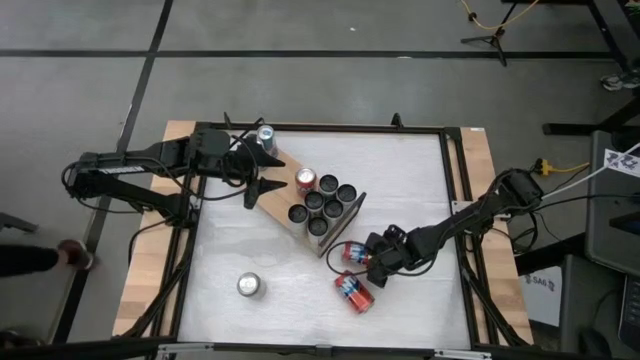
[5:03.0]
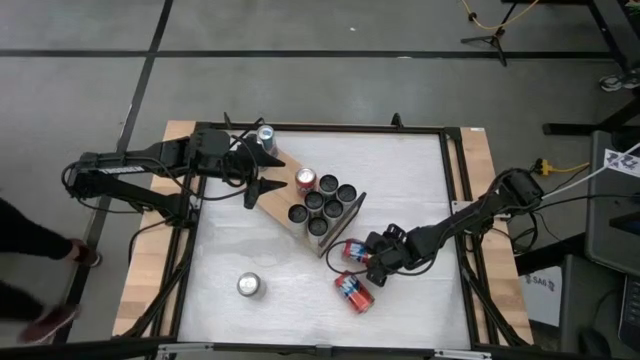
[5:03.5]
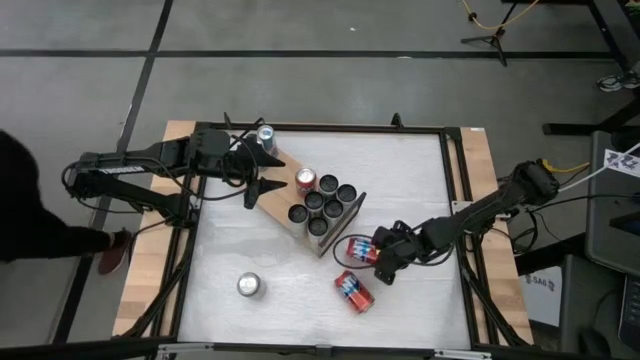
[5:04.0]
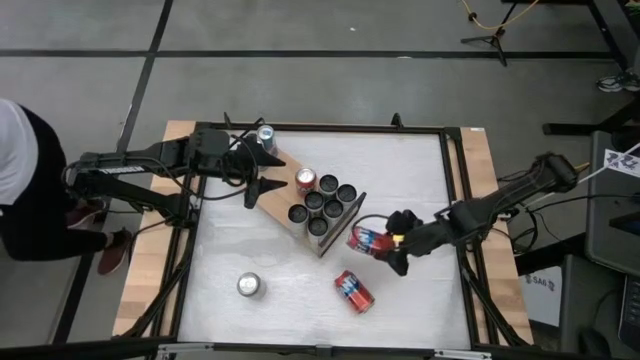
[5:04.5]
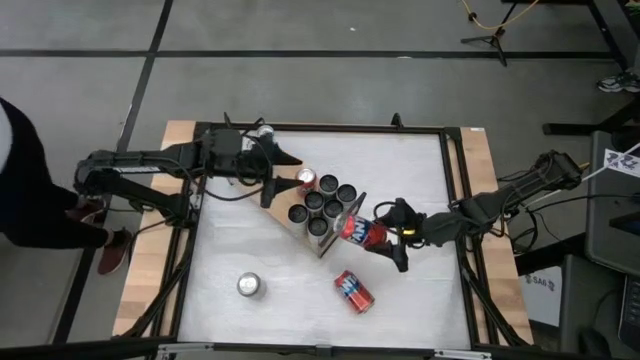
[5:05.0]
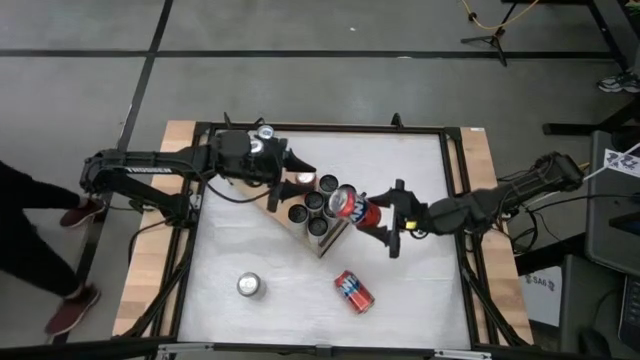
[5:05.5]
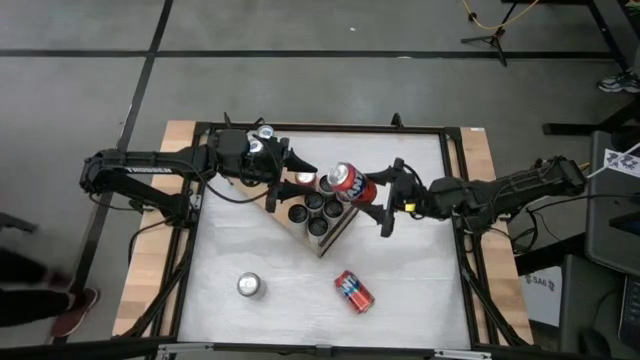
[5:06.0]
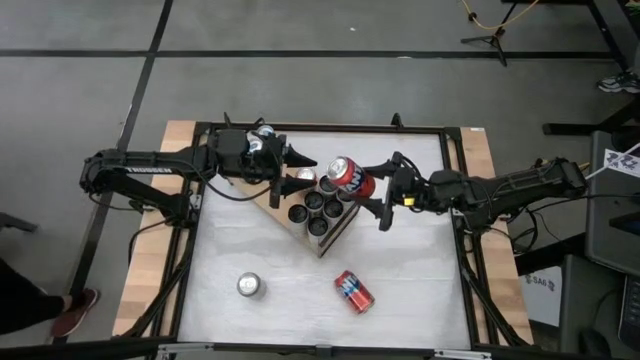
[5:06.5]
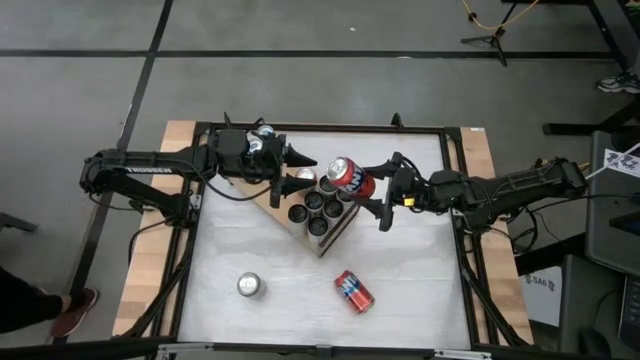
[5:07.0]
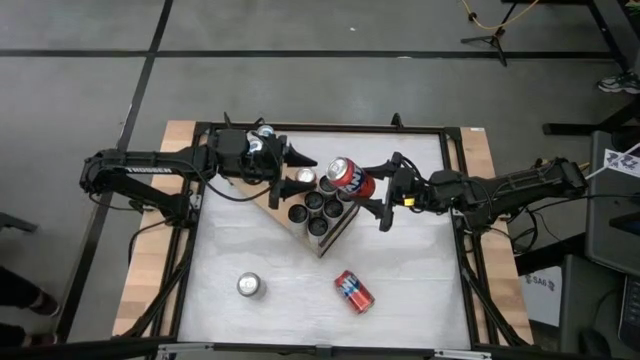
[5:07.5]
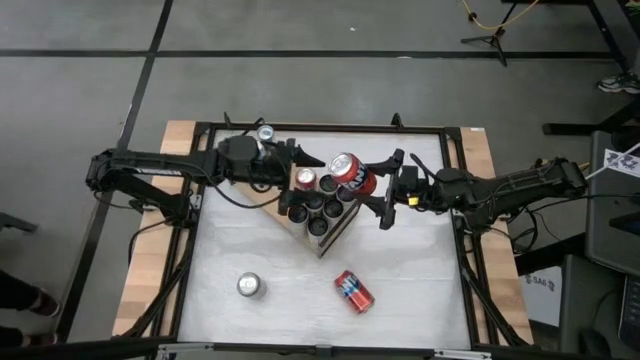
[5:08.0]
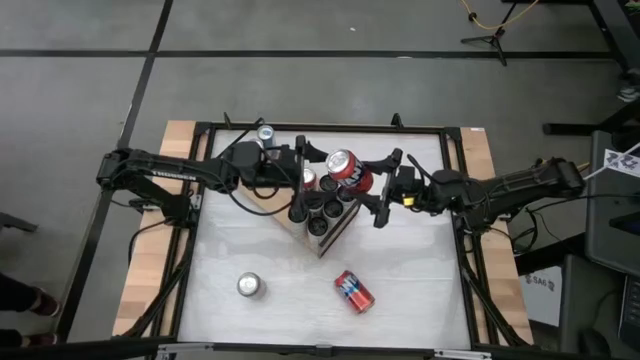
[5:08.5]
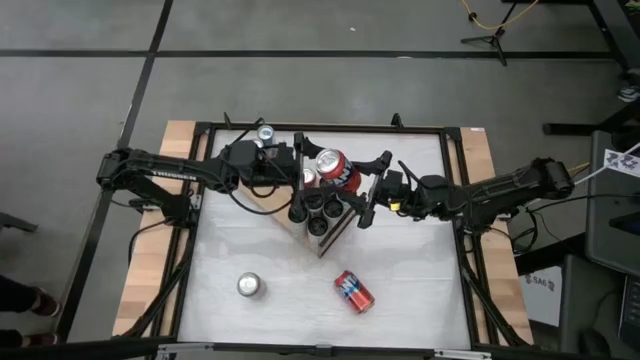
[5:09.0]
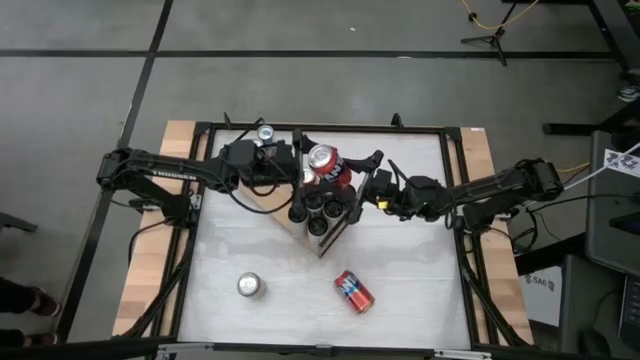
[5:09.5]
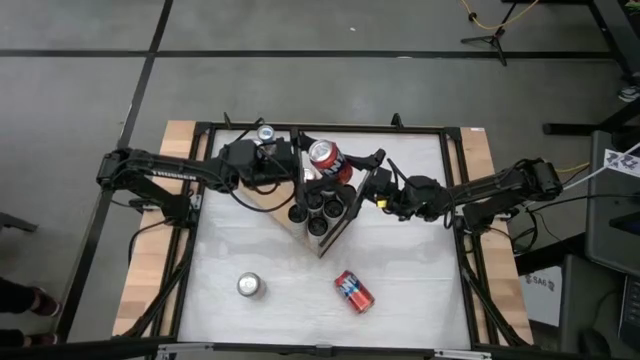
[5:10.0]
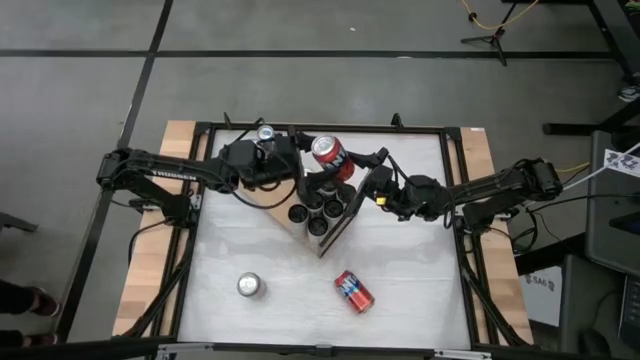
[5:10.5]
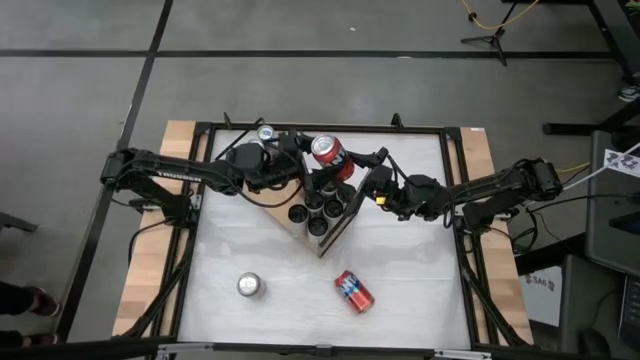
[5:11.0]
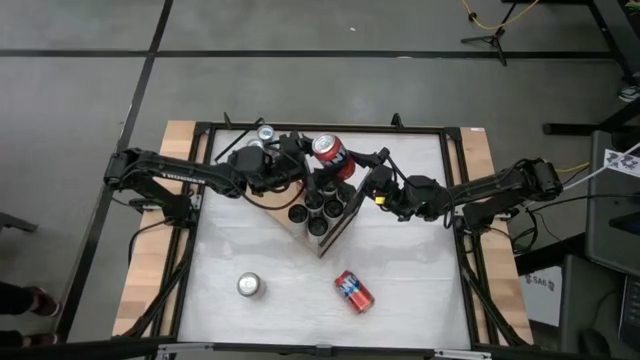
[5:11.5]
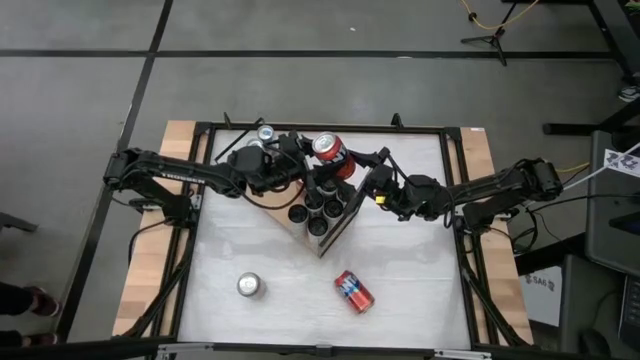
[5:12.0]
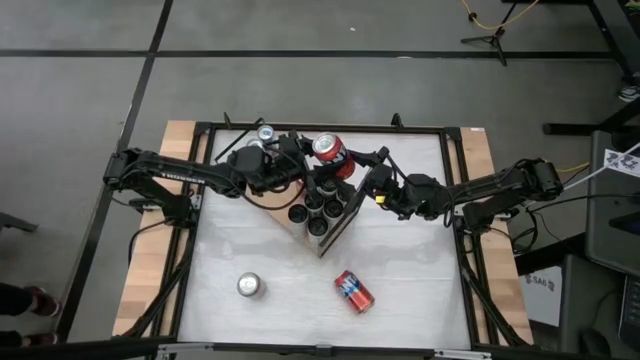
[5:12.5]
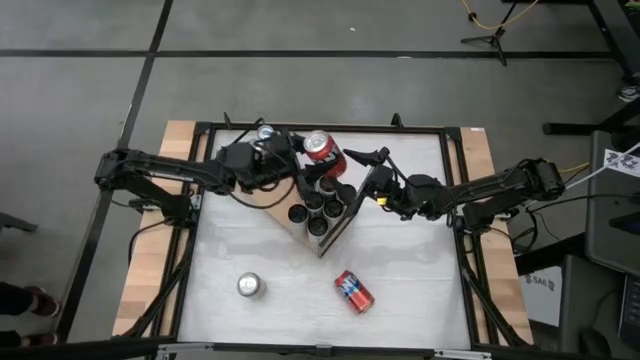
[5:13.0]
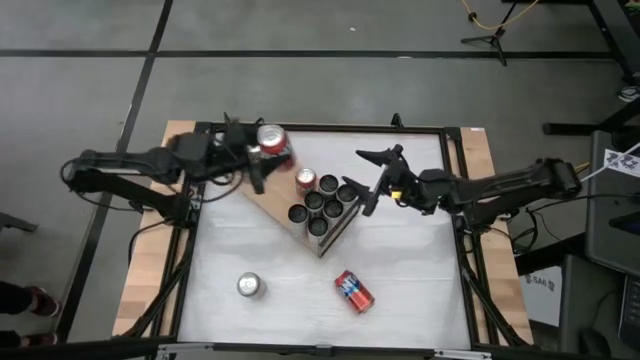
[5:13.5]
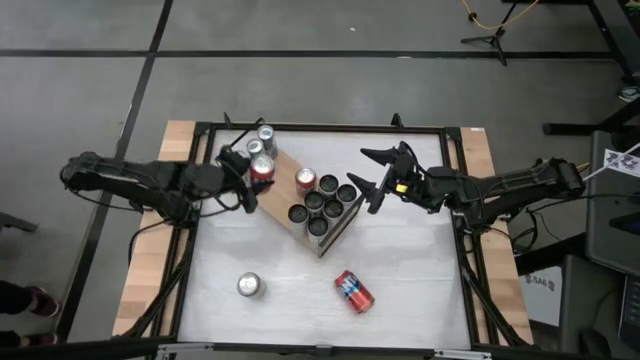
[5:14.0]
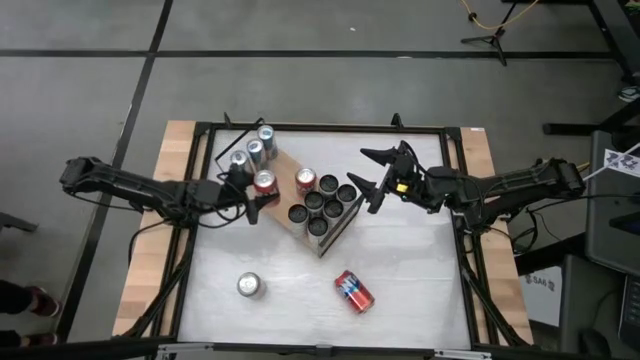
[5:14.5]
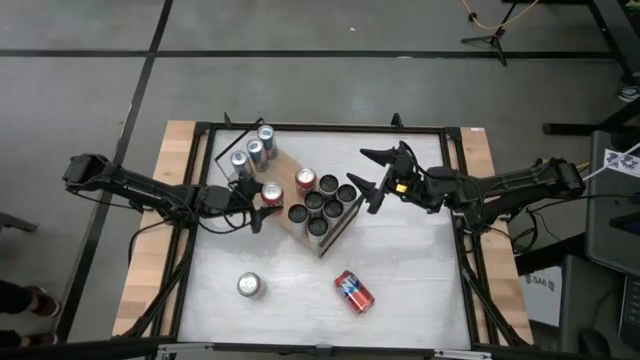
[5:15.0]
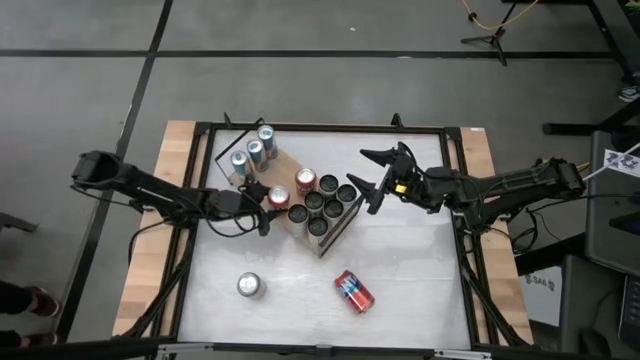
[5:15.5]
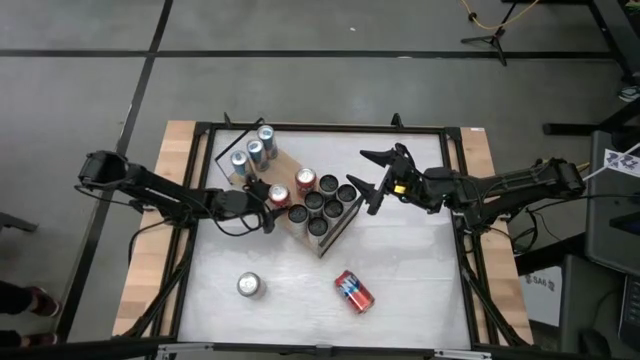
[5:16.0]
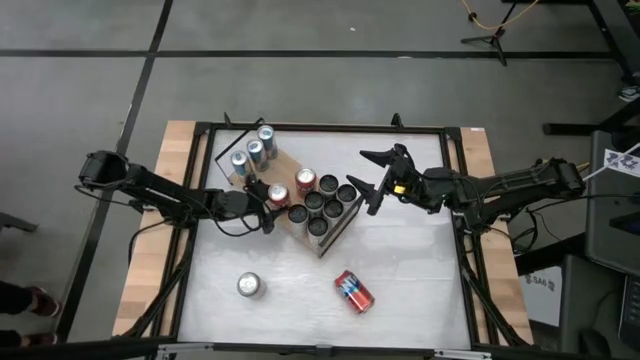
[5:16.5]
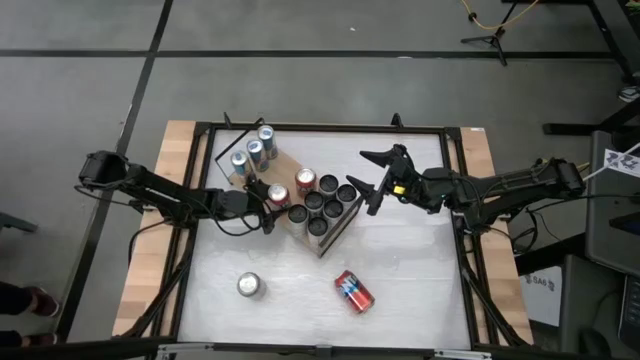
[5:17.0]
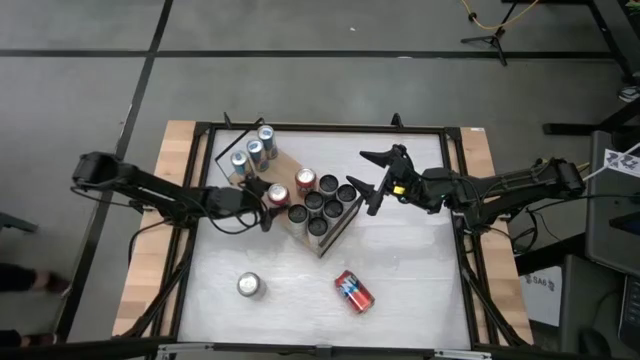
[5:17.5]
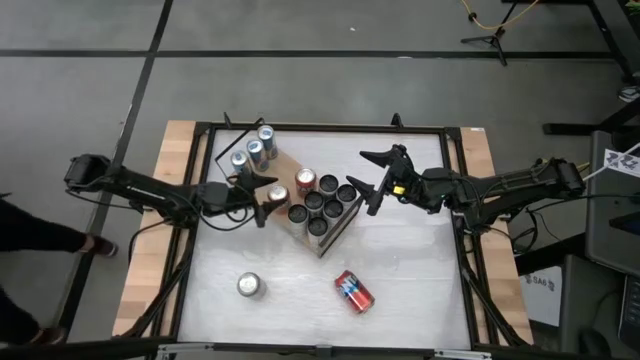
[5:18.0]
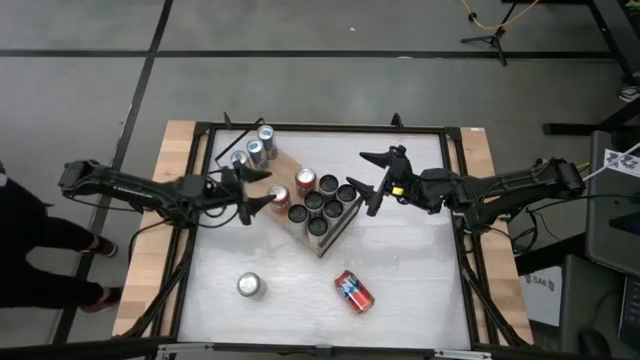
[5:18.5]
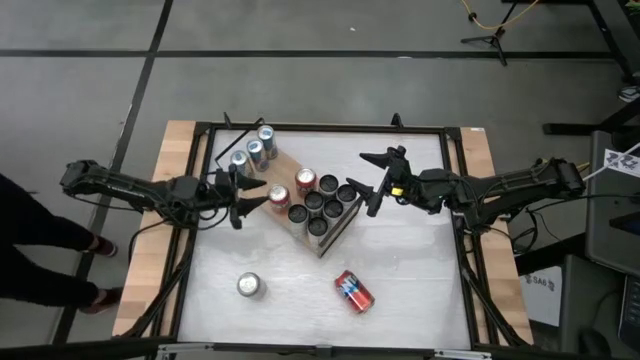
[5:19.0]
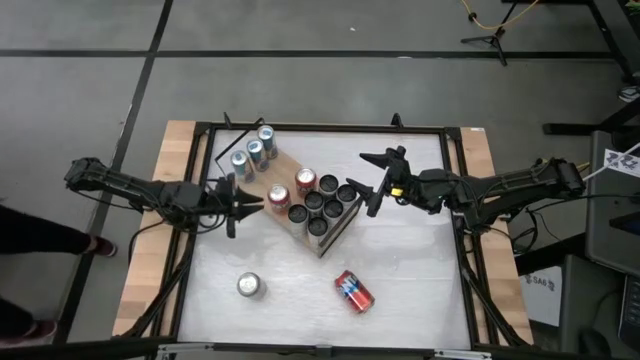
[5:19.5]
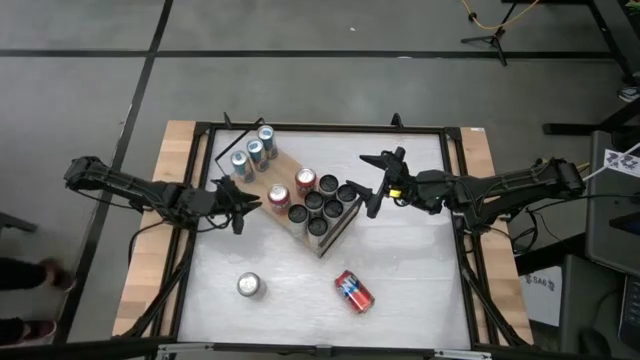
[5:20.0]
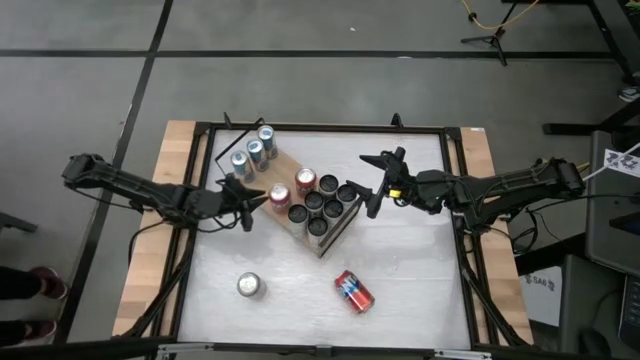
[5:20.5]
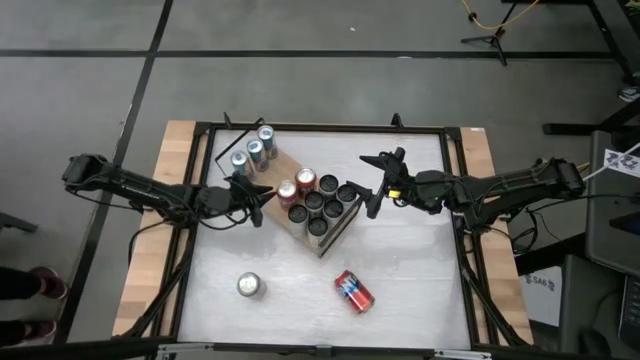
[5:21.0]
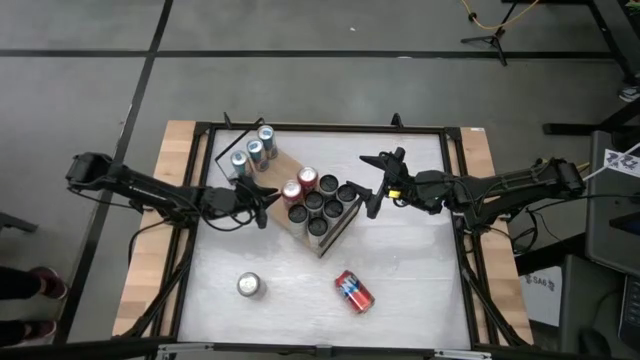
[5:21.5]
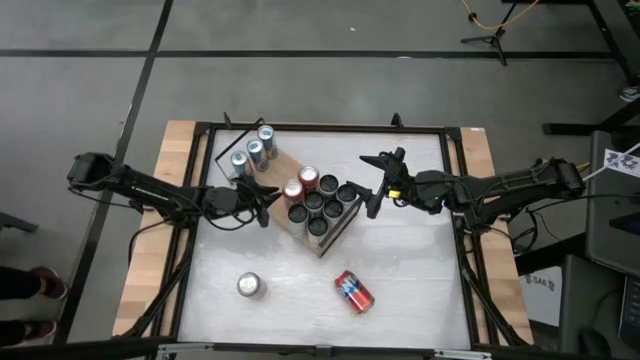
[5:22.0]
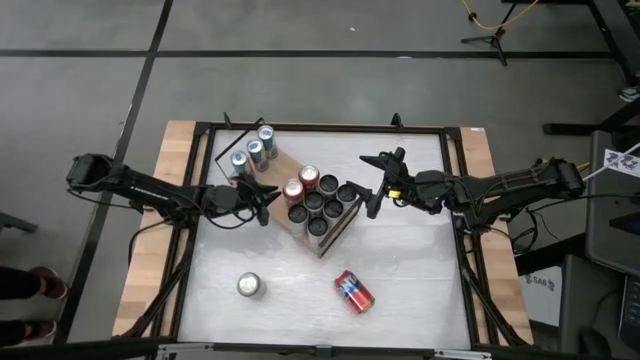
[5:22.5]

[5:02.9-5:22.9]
Task: Place canned beverage on shelf
Put the top red soda can on the shelf aligned with the other red soda can
